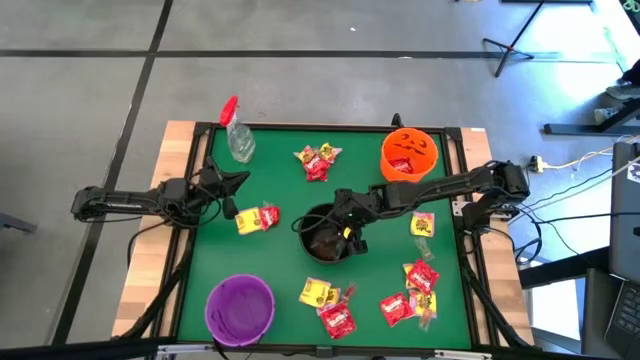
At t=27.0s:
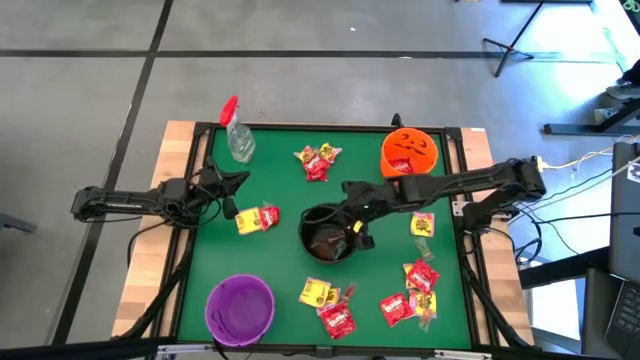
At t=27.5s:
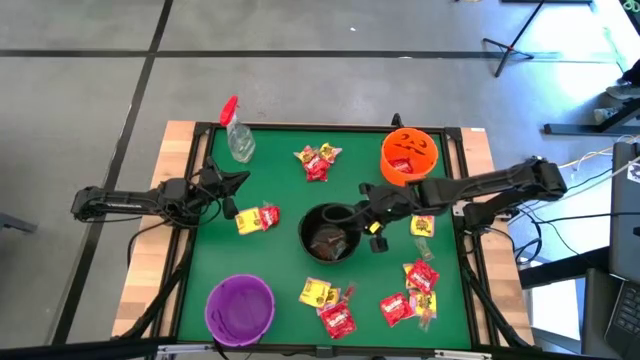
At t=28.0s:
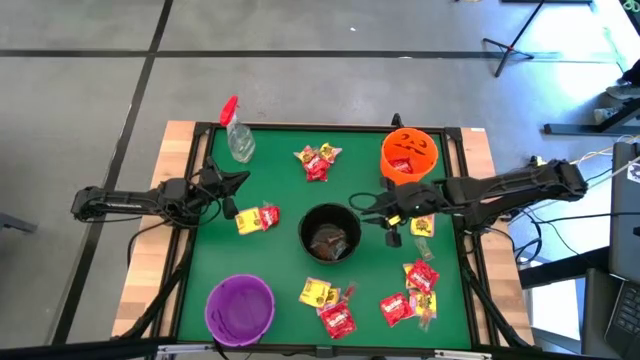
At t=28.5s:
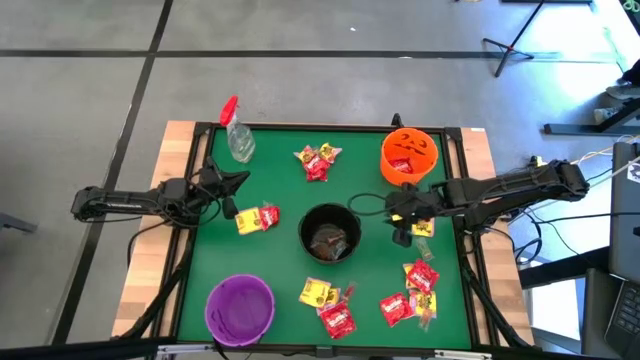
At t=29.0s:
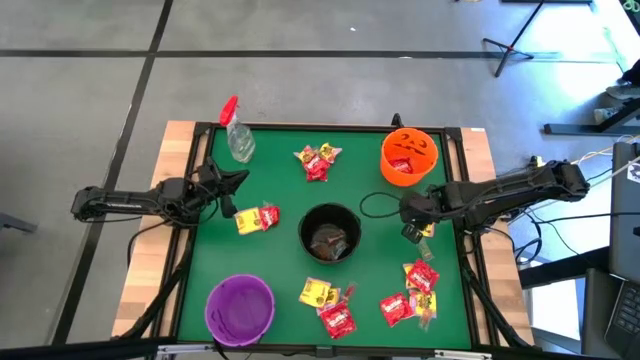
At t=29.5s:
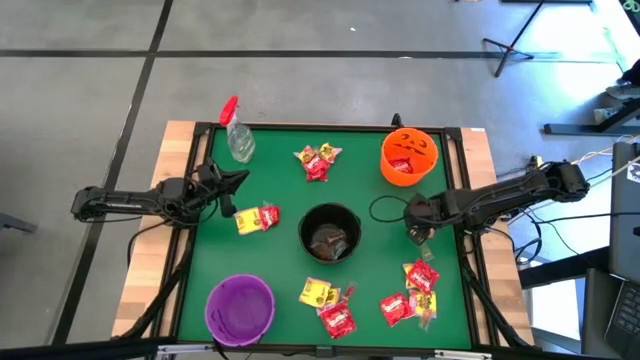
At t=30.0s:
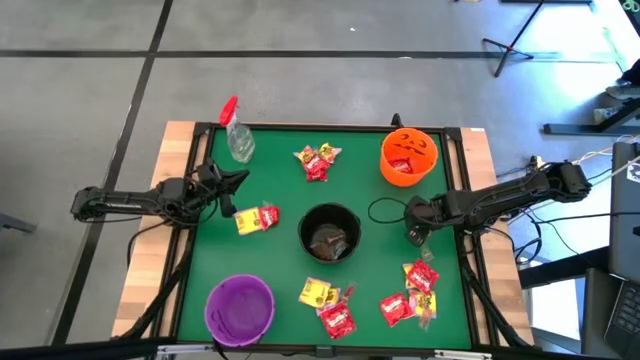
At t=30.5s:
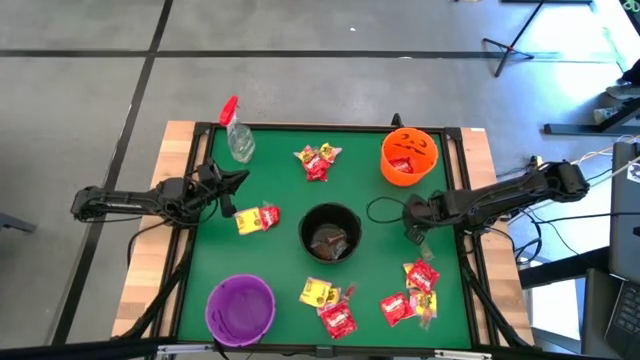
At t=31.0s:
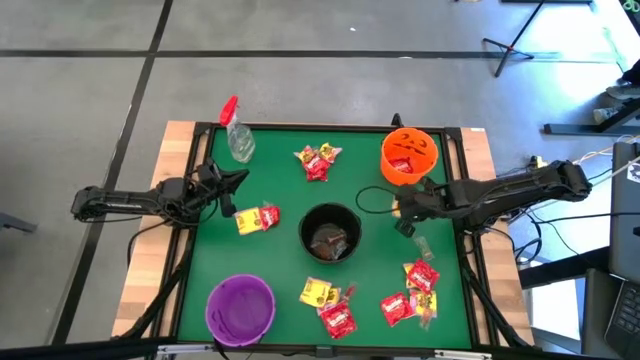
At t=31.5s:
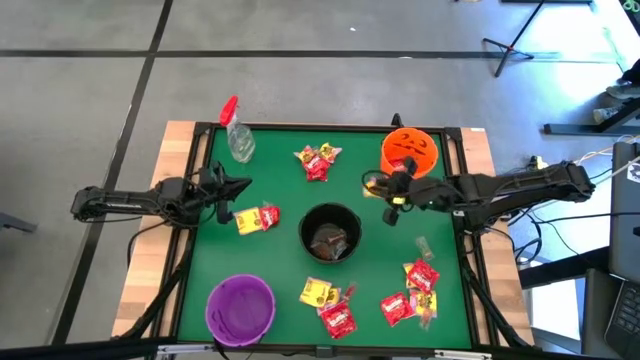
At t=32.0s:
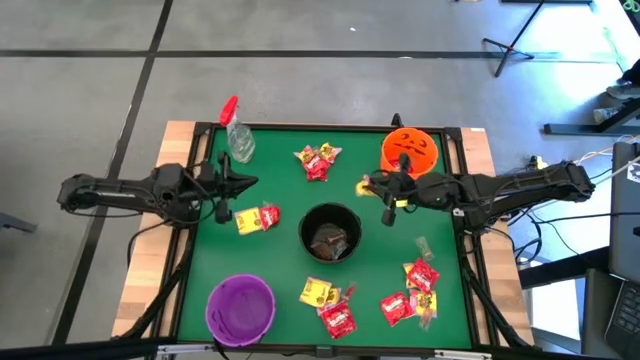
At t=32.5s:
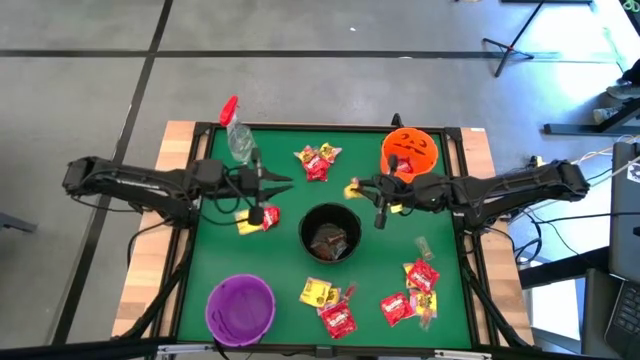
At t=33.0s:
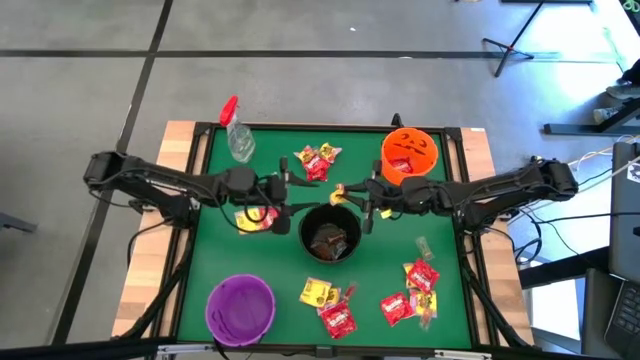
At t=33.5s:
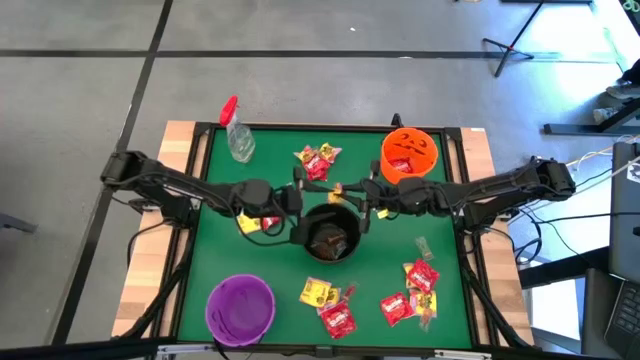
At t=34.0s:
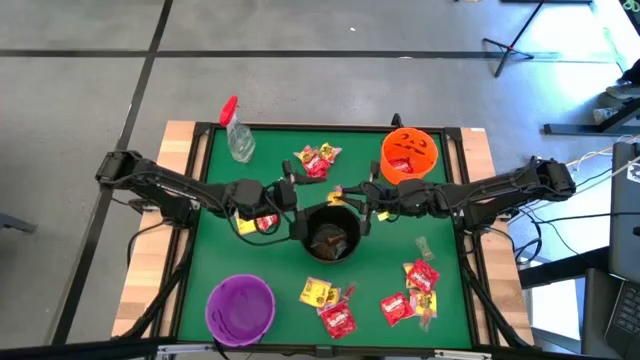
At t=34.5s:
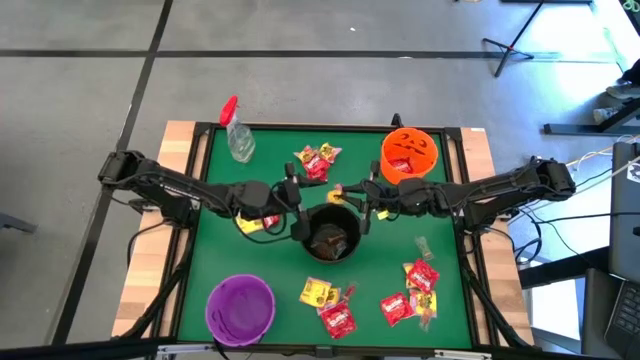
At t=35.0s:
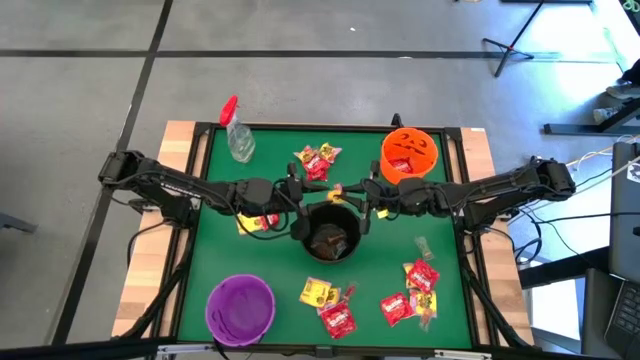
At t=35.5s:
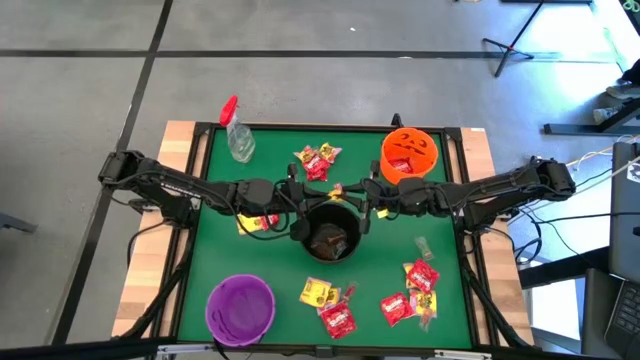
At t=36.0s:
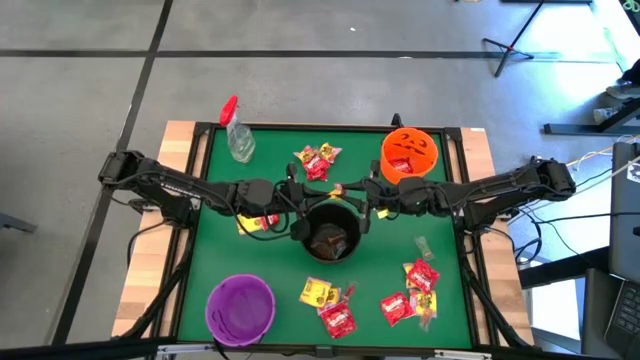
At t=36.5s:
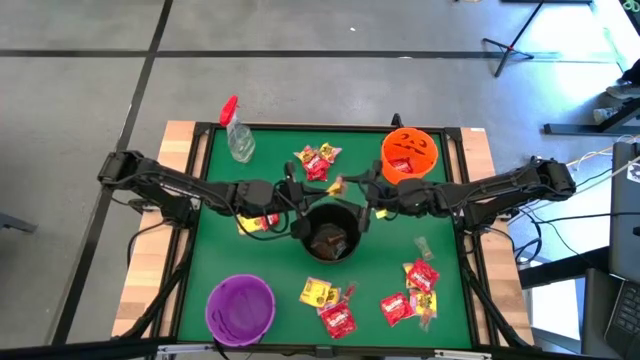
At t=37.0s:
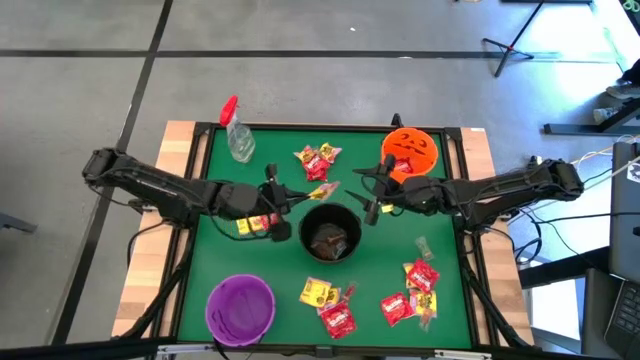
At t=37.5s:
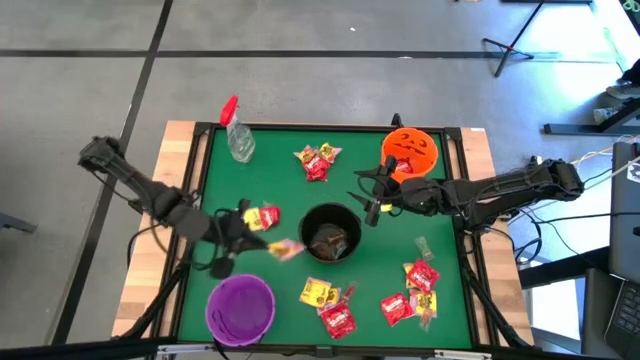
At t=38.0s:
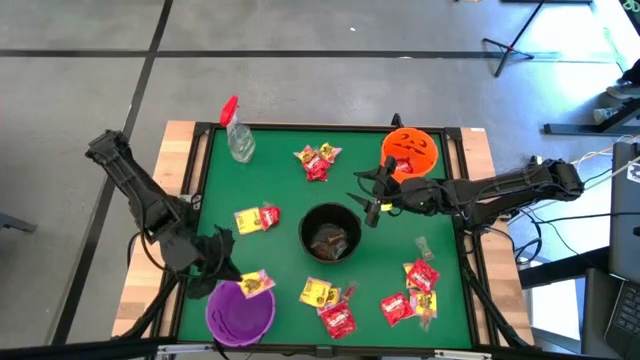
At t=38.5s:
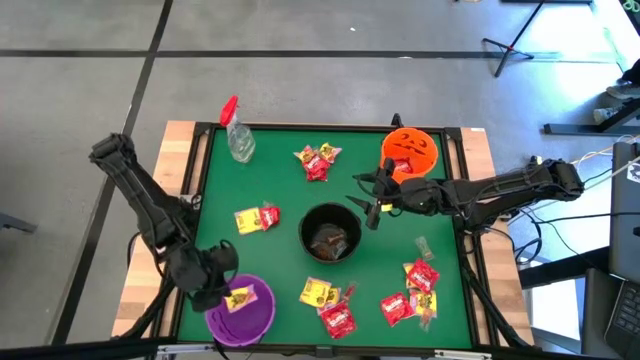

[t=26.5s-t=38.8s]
Task: Sort candy
Put the yellow candy into the purple bucket

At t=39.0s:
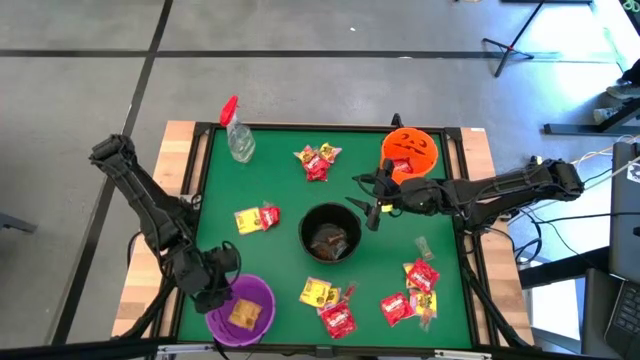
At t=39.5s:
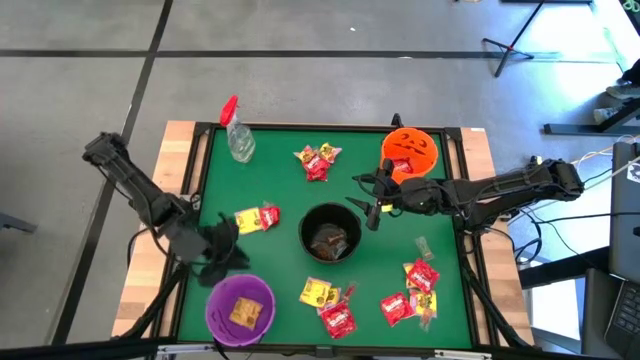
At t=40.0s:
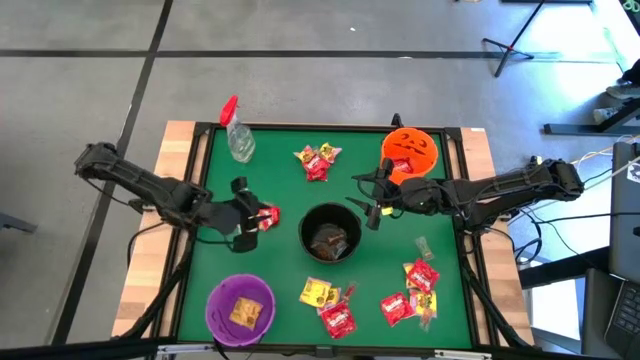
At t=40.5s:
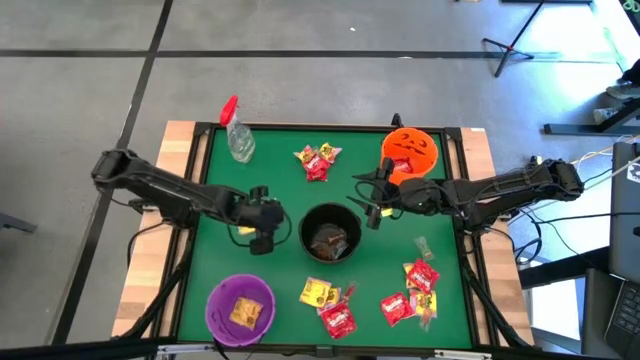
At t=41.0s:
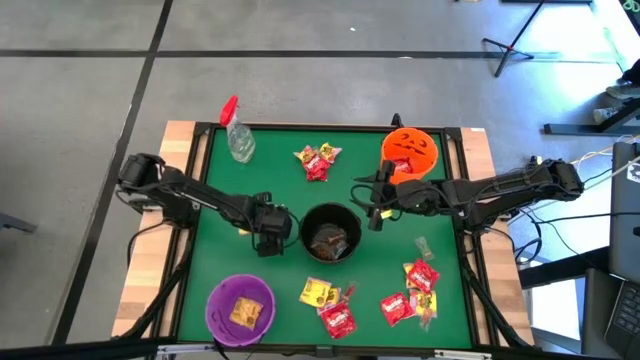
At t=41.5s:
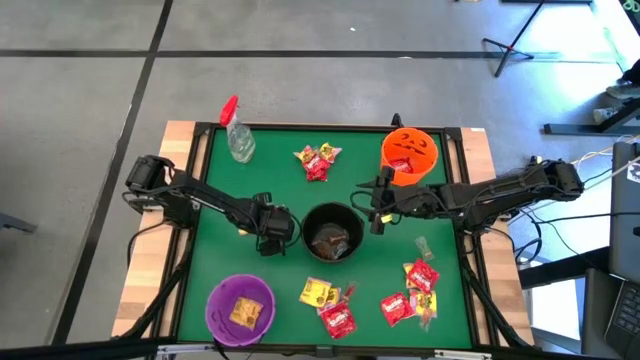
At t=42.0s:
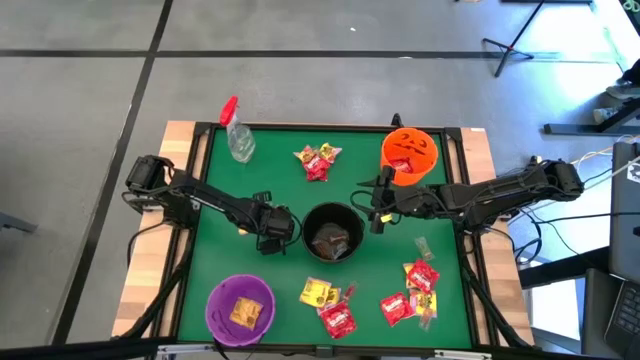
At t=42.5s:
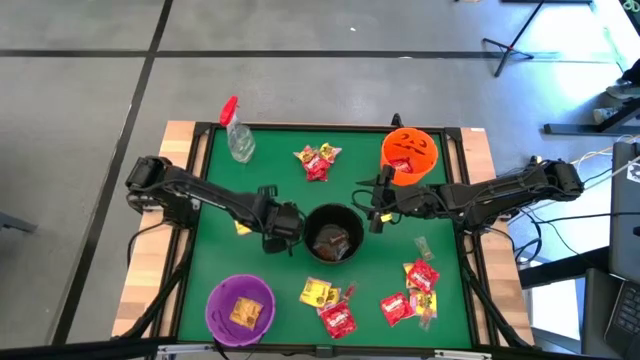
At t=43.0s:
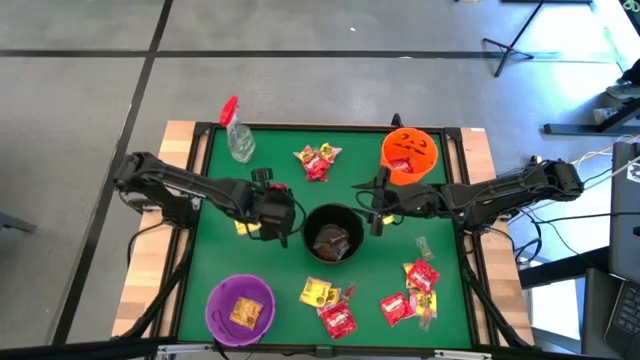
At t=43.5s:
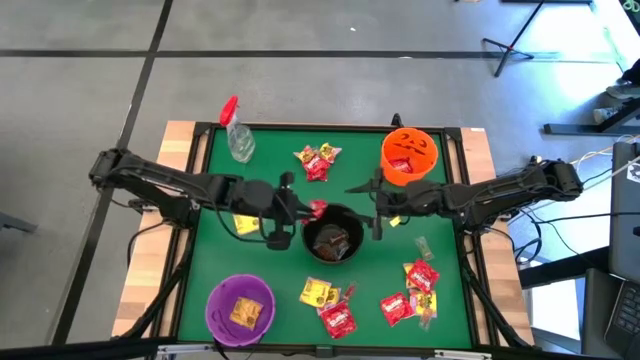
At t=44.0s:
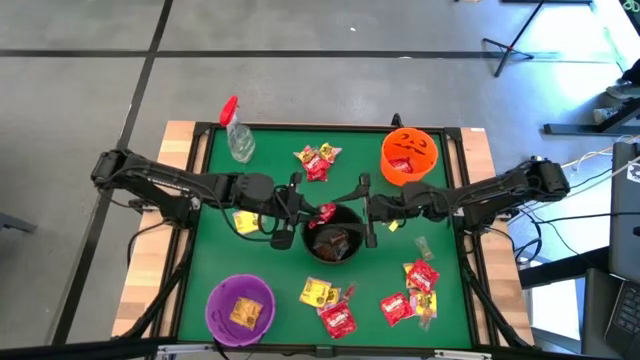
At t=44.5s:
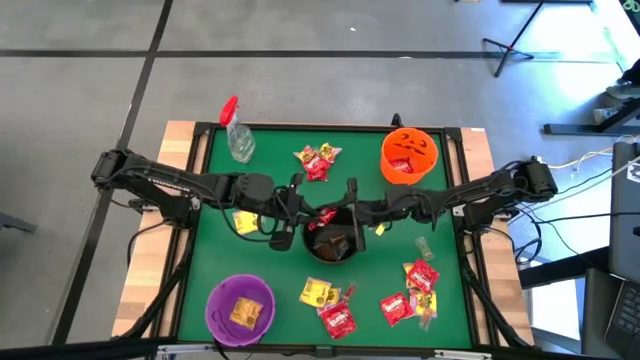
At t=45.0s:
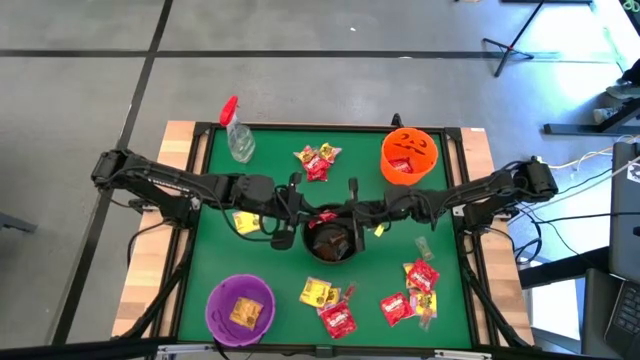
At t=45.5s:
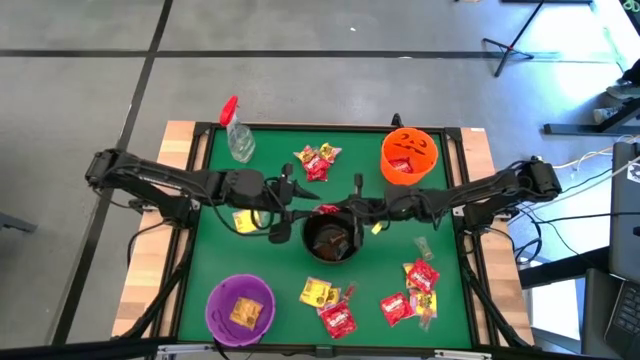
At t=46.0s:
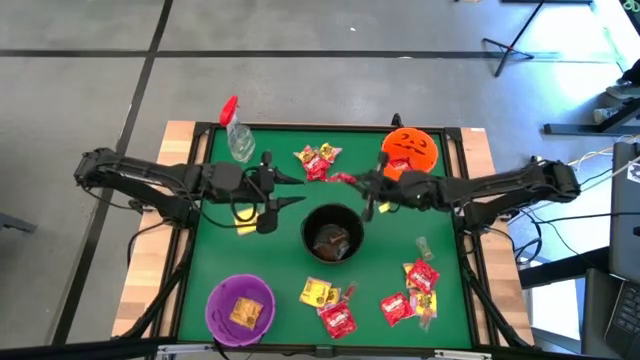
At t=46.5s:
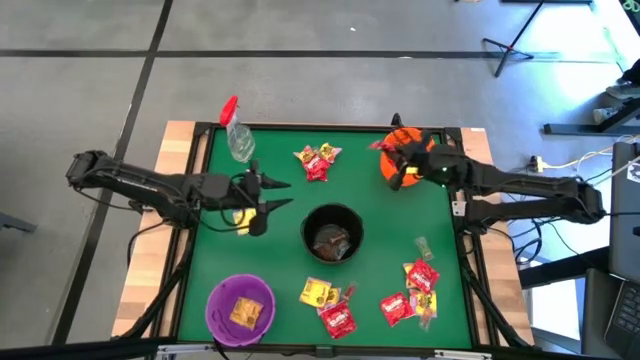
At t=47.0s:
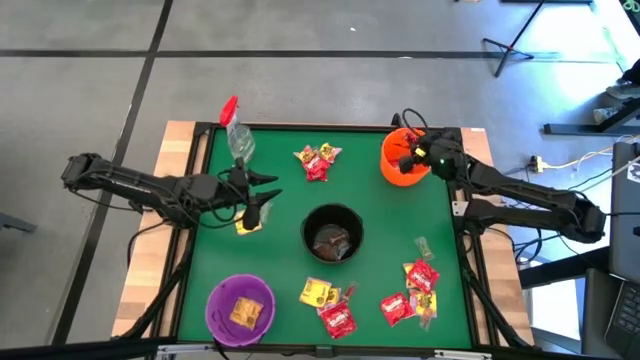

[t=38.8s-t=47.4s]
Put the red candy into the orange bucket
